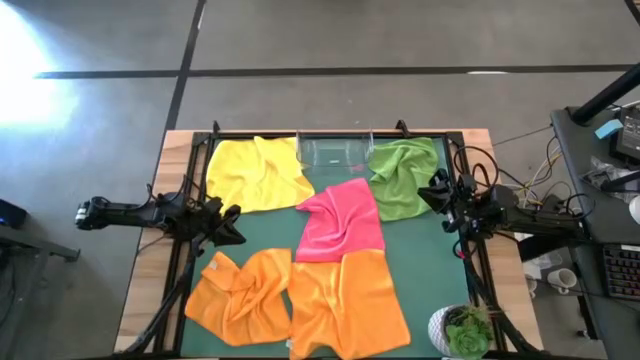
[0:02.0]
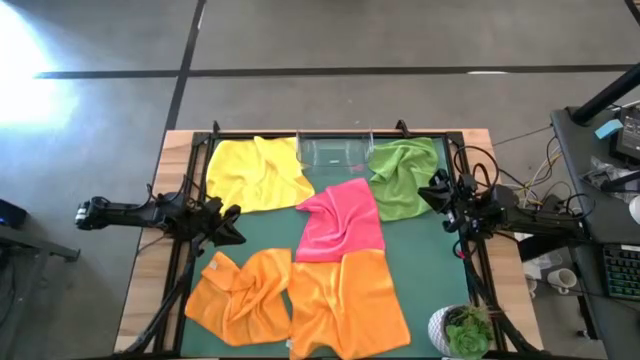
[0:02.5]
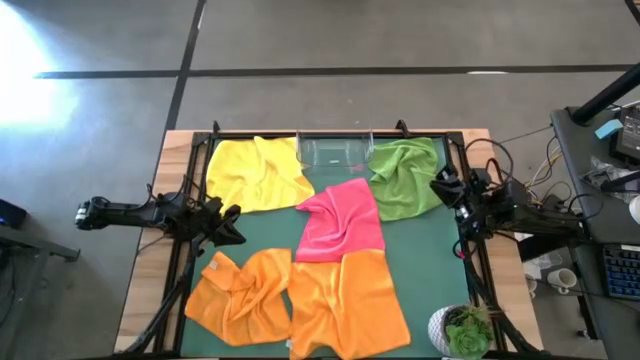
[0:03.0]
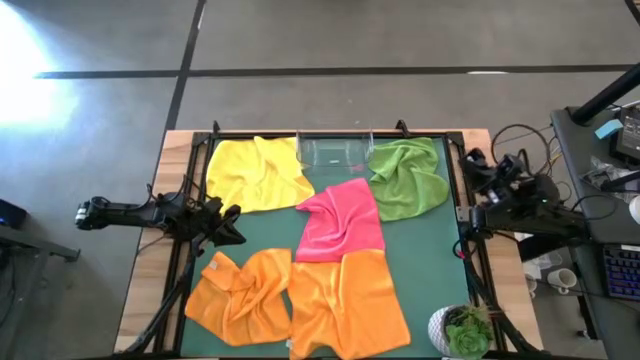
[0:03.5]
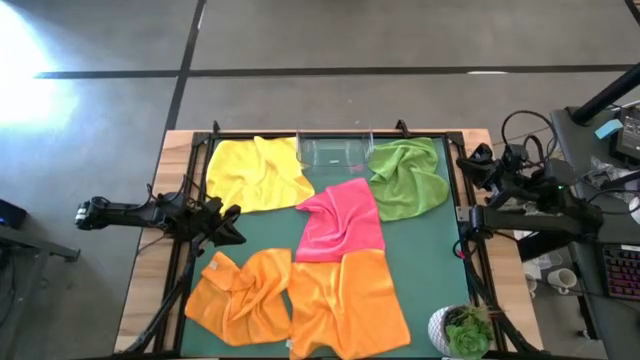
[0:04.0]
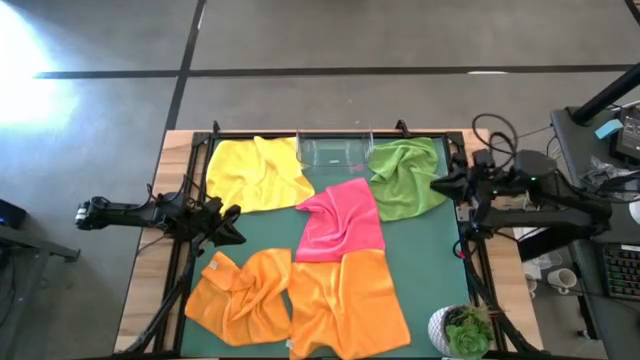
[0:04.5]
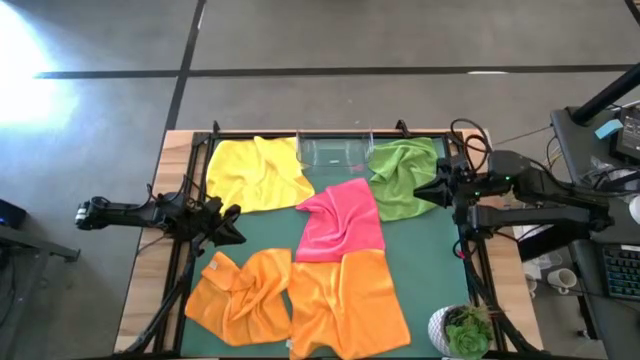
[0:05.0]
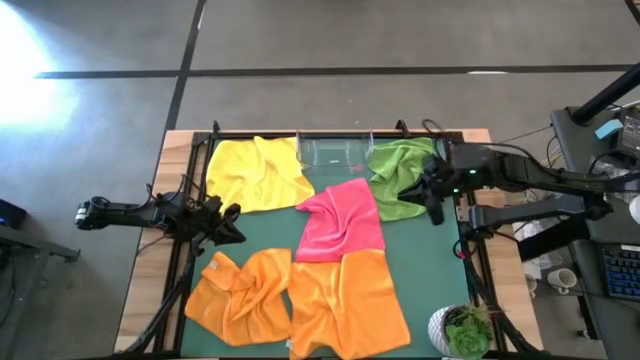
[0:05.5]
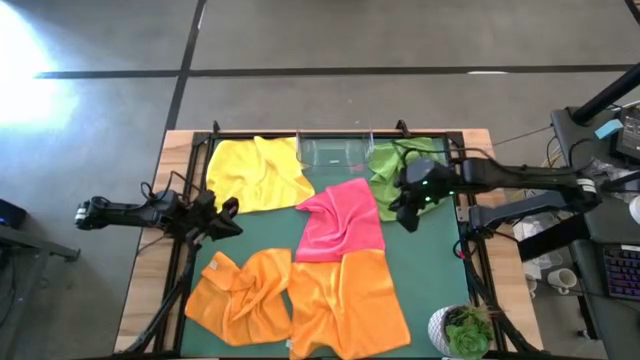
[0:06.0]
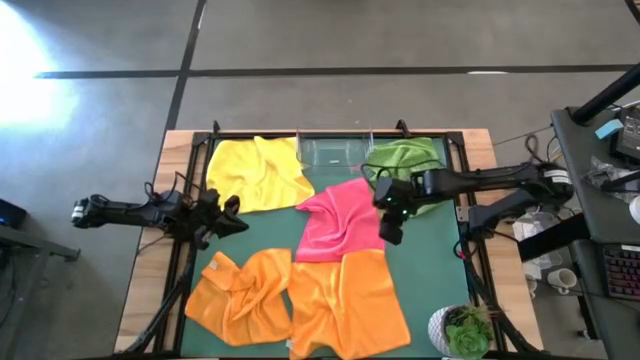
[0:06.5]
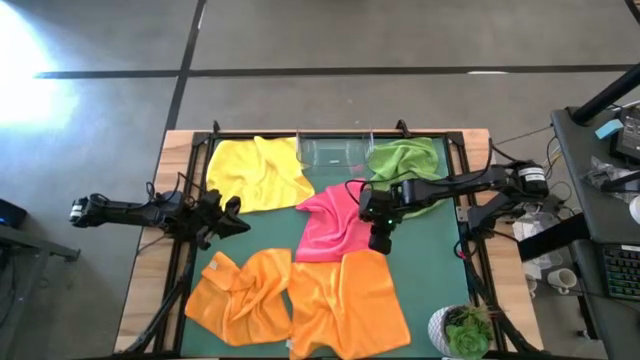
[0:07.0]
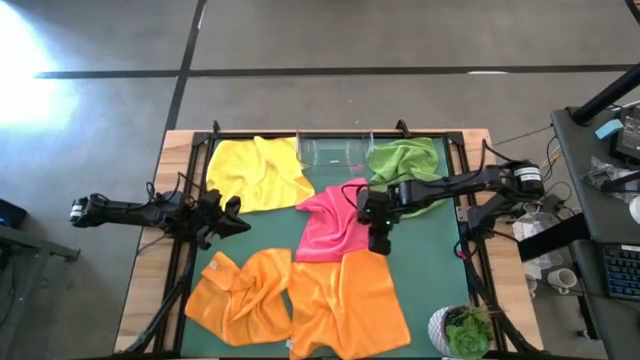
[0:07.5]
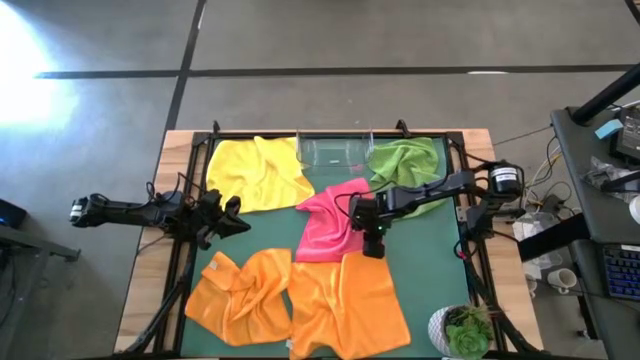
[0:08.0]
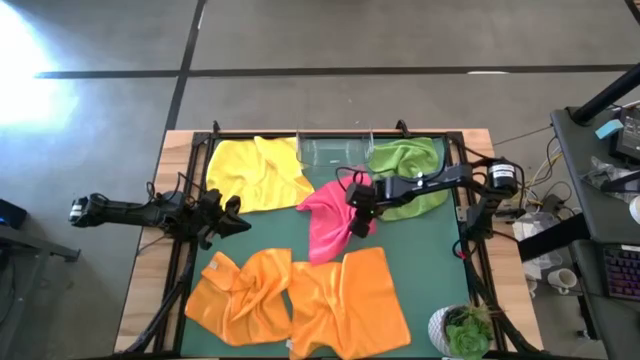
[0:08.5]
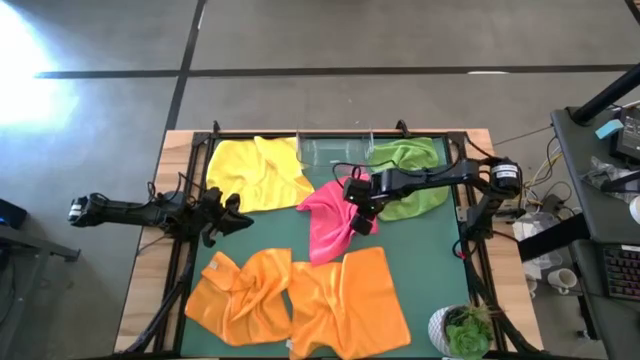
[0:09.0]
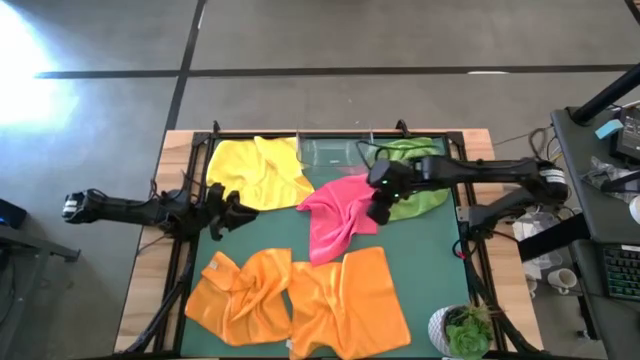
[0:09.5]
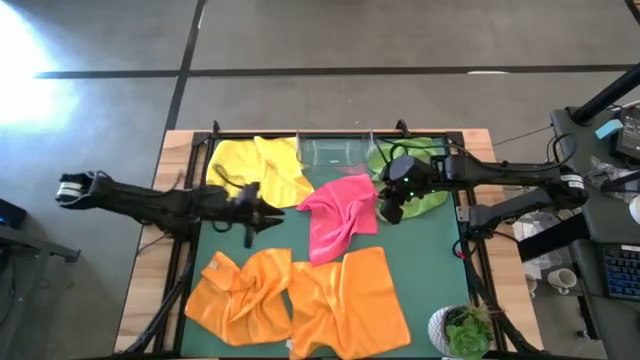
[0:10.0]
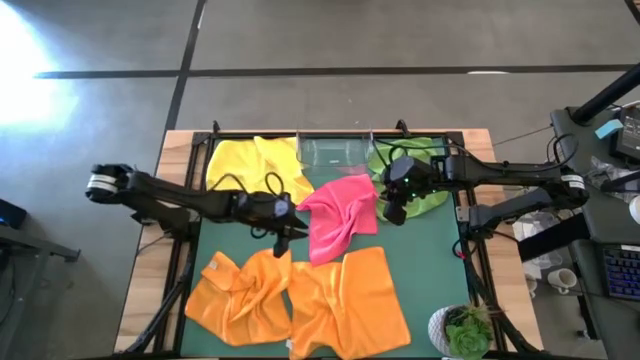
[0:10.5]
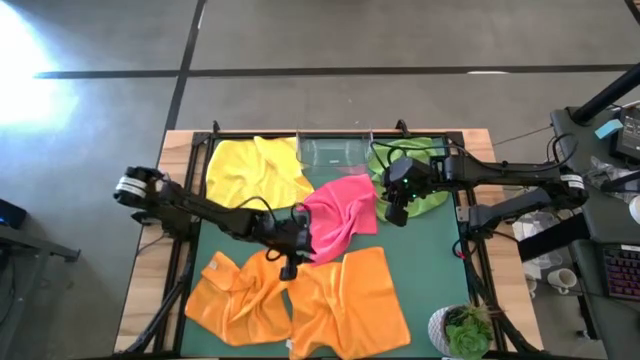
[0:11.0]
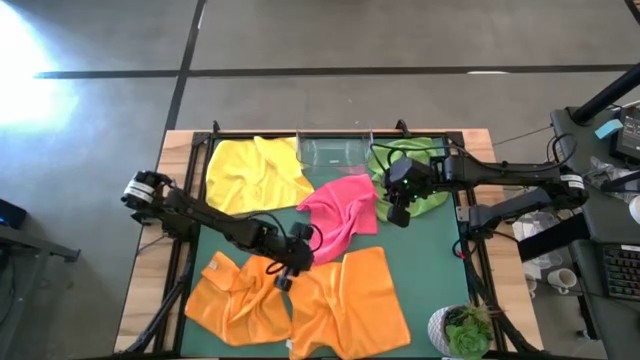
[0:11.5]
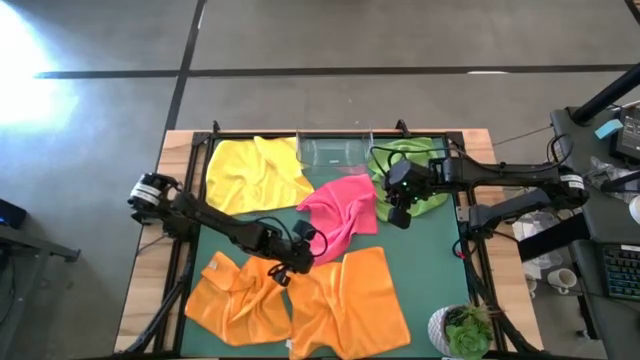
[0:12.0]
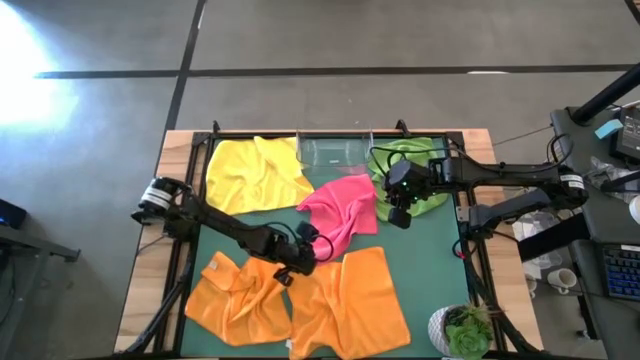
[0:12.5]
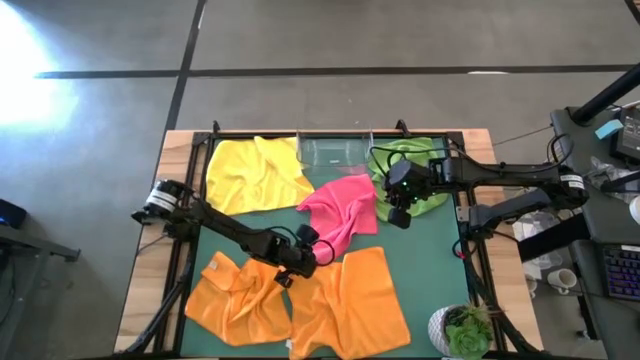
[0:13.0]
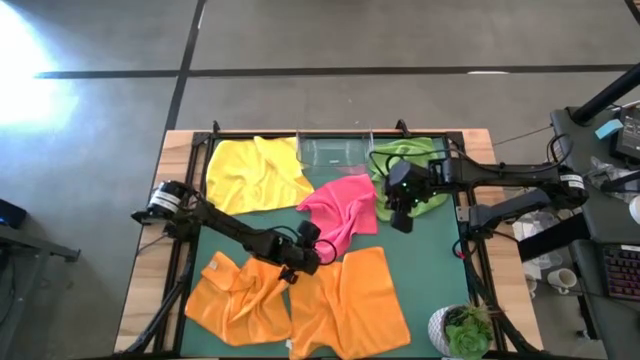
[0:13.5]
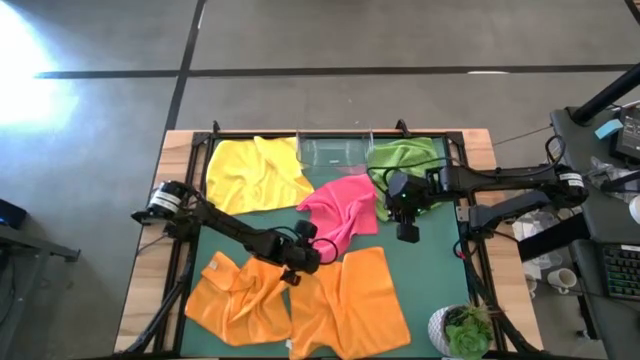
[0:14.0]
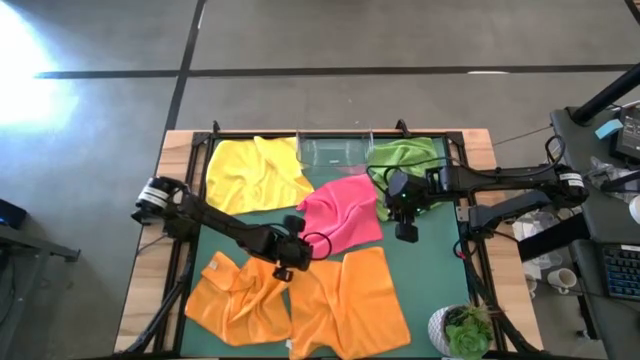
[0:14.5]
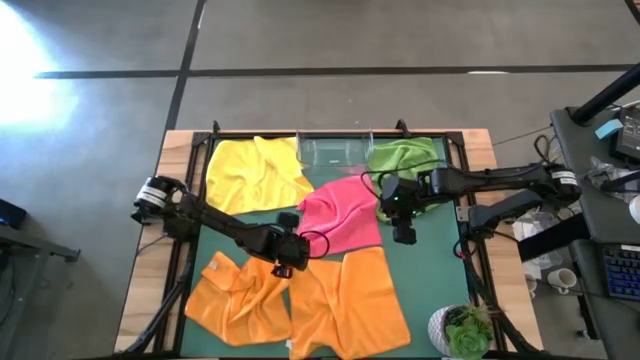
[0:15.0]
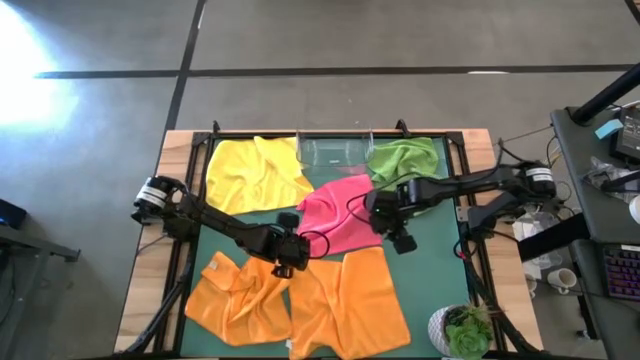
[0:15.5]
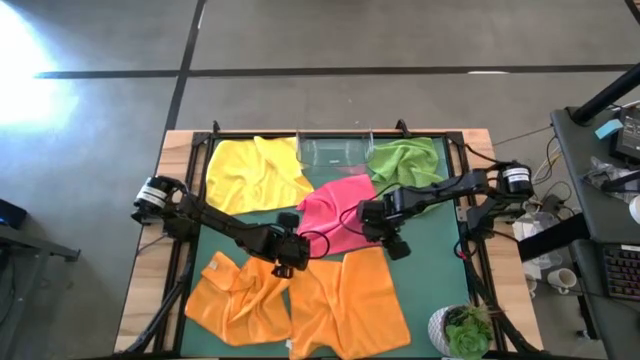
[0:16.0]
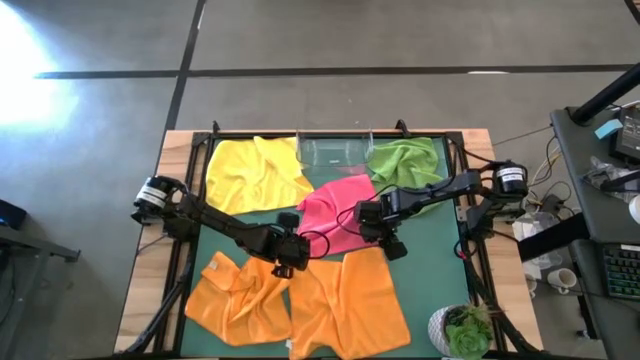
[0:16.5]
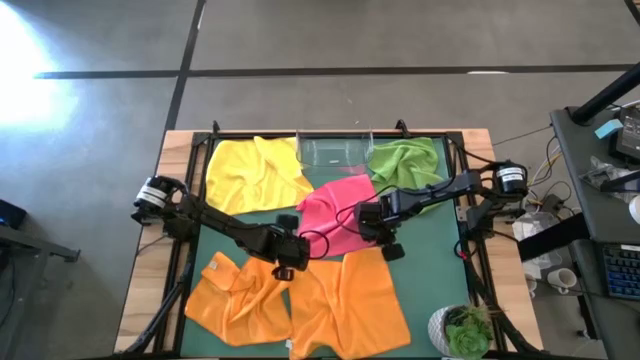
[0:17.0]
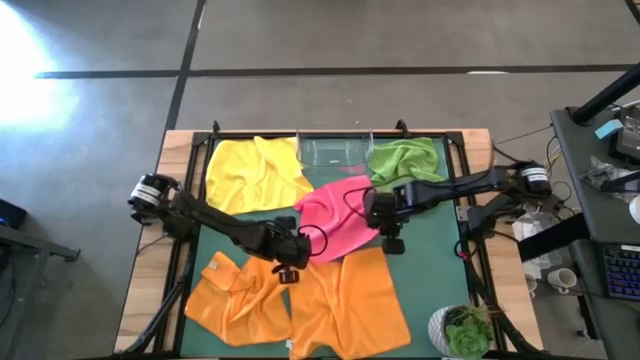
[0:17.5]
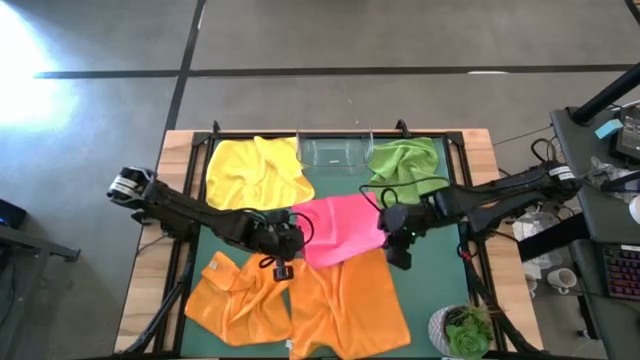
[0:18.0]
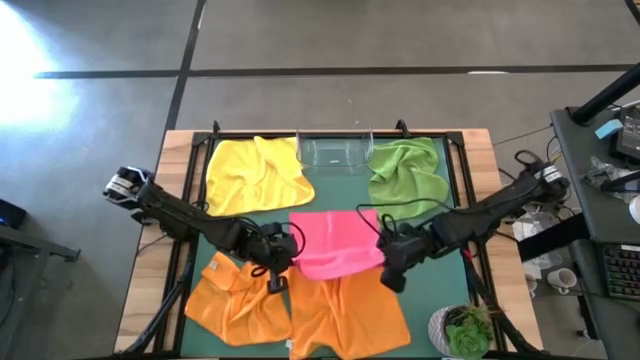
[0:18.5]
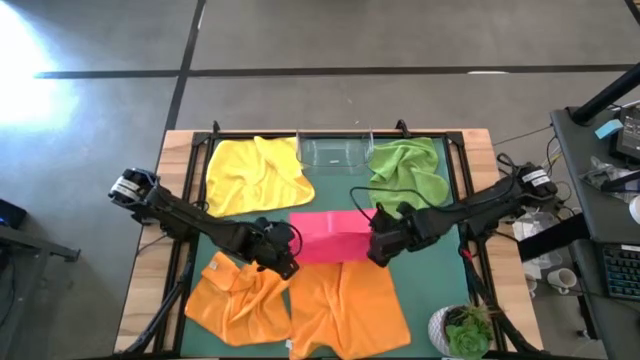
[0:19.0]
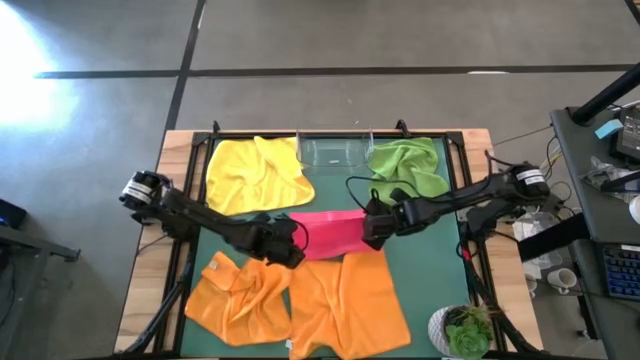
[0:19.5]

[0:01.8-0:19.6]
Task: Fold microfiber towels
Fold the pink microfiber towel
